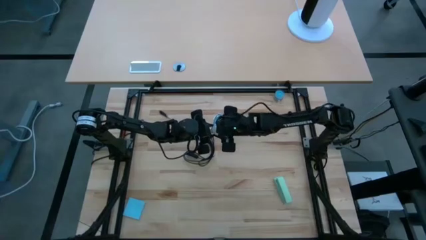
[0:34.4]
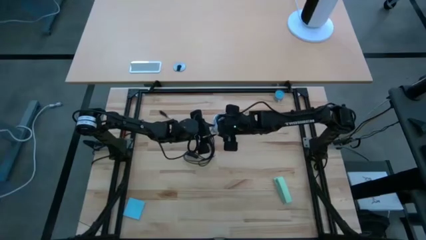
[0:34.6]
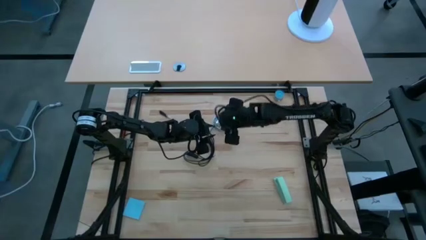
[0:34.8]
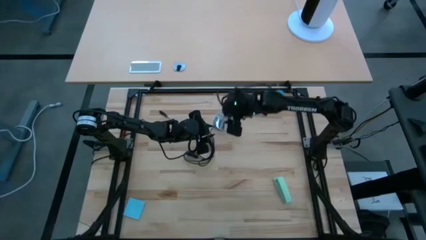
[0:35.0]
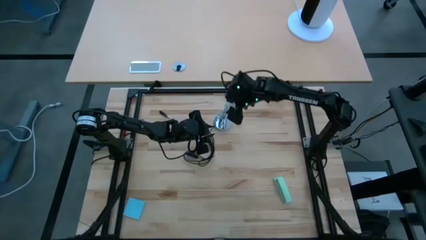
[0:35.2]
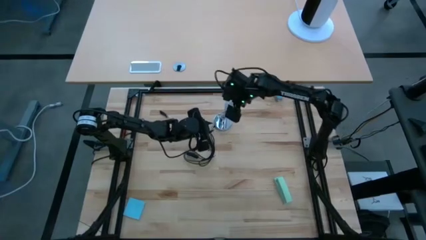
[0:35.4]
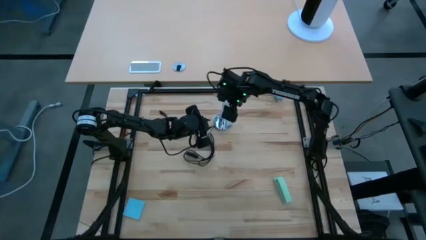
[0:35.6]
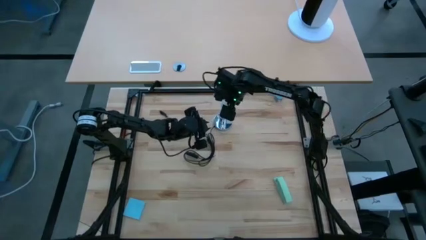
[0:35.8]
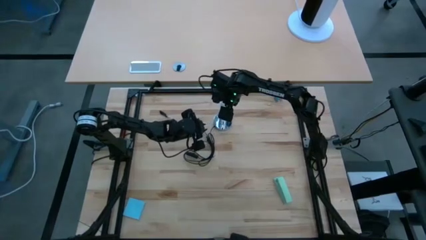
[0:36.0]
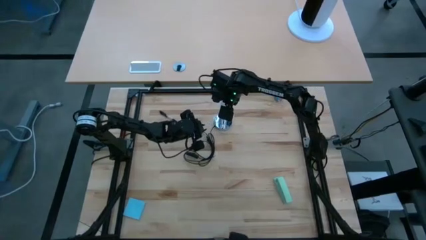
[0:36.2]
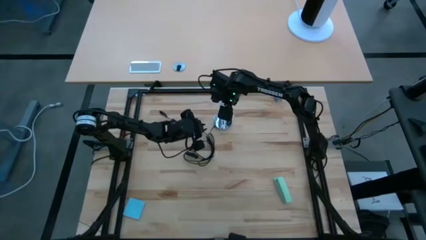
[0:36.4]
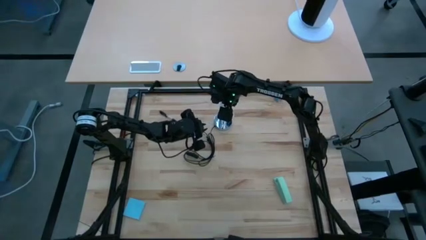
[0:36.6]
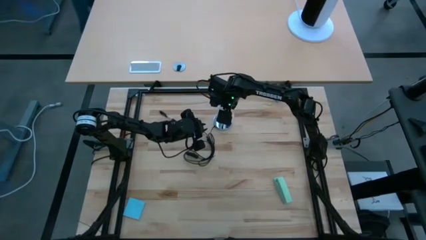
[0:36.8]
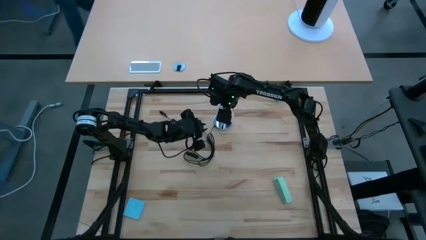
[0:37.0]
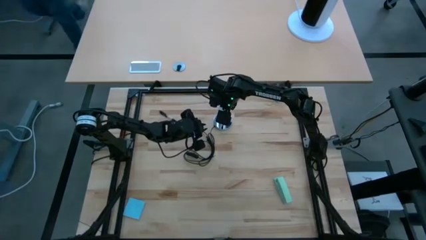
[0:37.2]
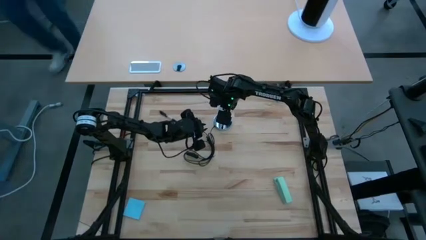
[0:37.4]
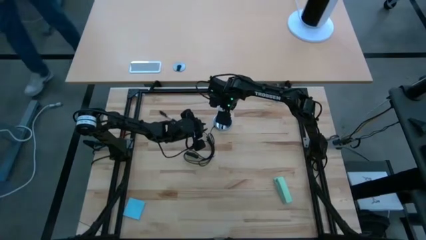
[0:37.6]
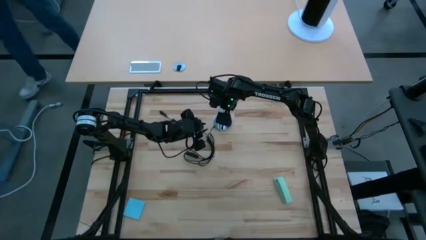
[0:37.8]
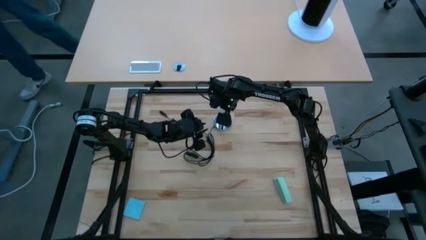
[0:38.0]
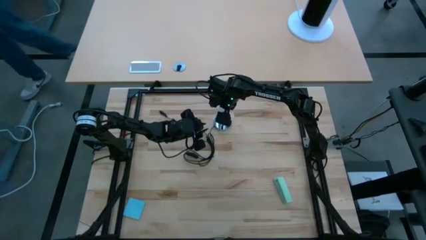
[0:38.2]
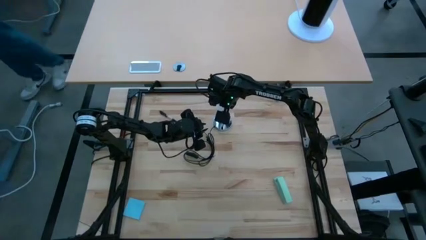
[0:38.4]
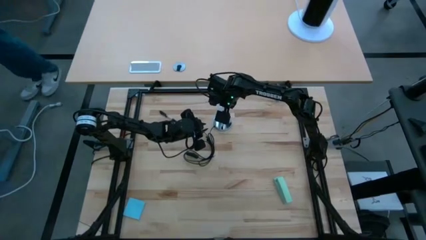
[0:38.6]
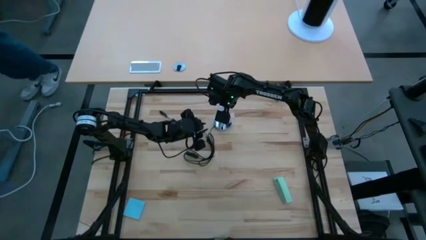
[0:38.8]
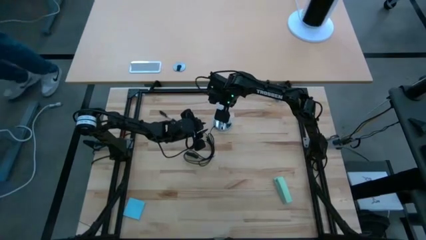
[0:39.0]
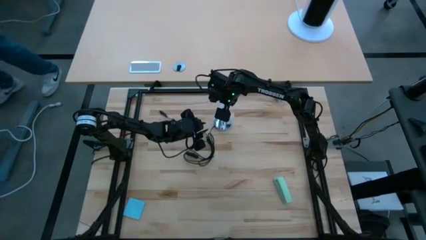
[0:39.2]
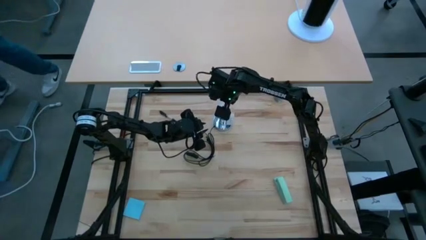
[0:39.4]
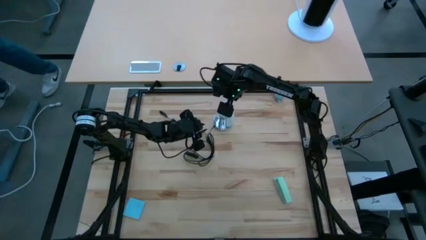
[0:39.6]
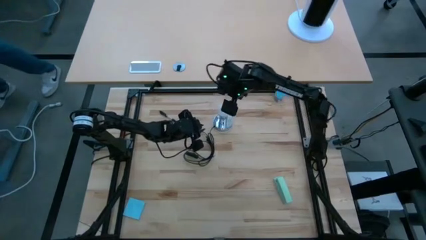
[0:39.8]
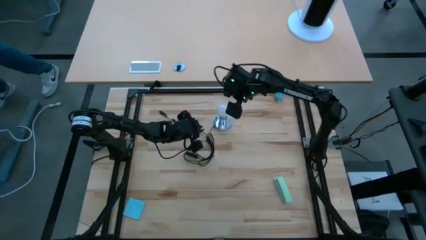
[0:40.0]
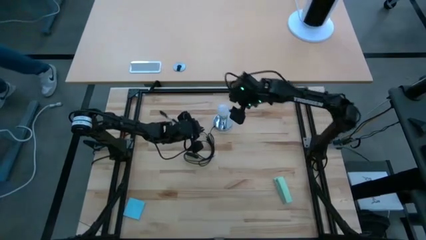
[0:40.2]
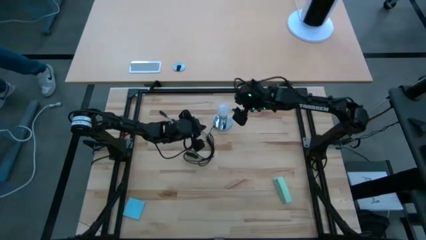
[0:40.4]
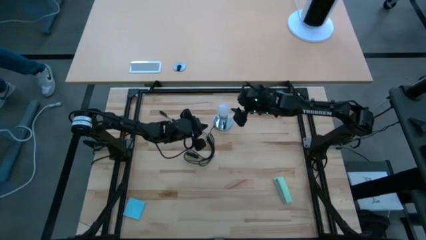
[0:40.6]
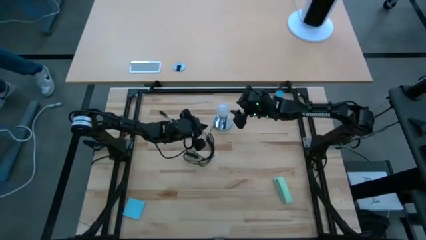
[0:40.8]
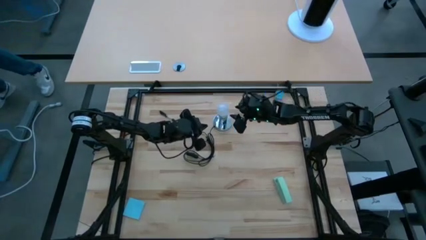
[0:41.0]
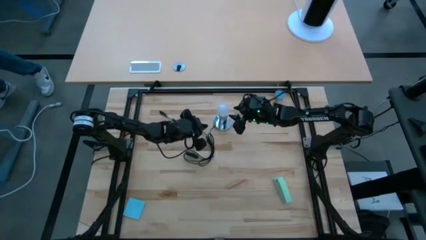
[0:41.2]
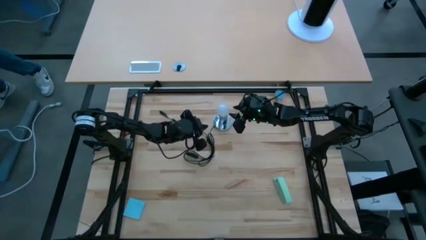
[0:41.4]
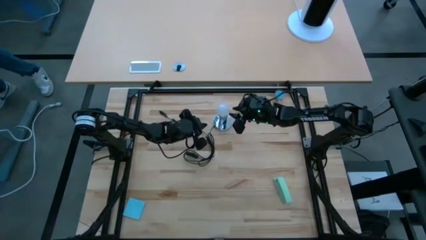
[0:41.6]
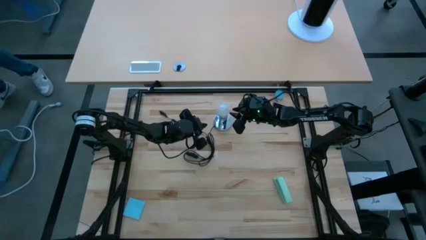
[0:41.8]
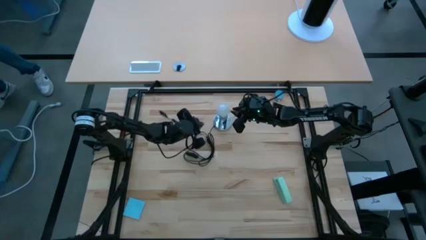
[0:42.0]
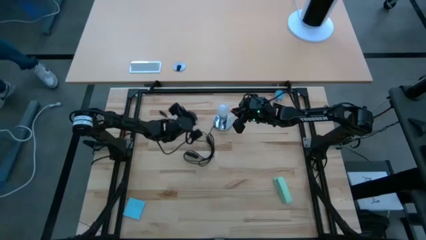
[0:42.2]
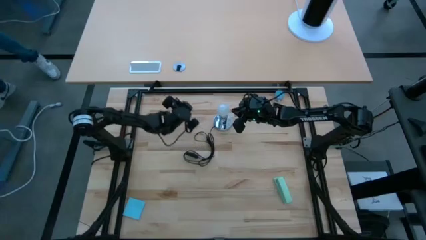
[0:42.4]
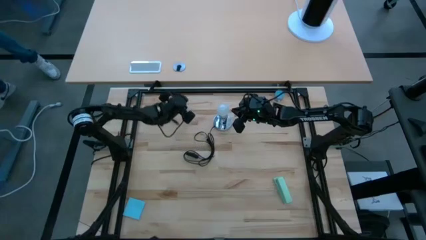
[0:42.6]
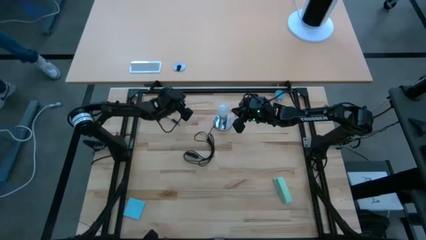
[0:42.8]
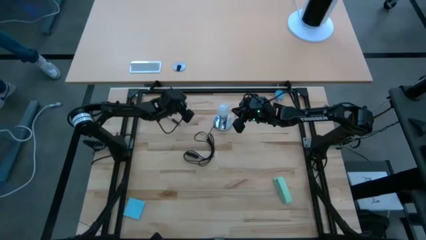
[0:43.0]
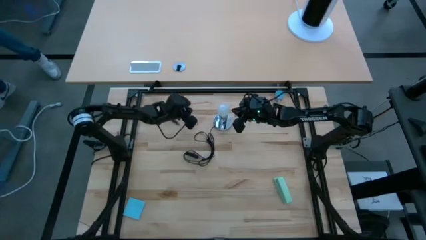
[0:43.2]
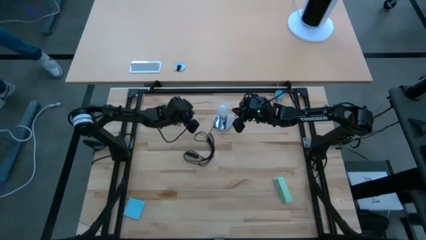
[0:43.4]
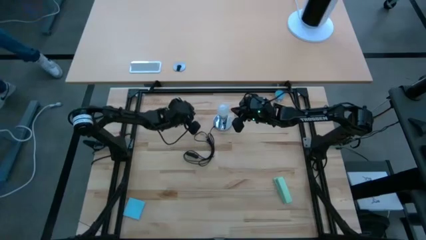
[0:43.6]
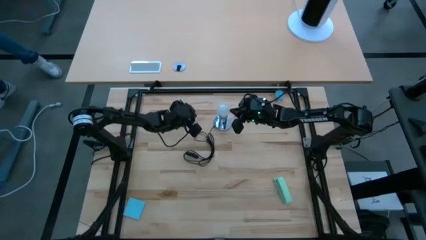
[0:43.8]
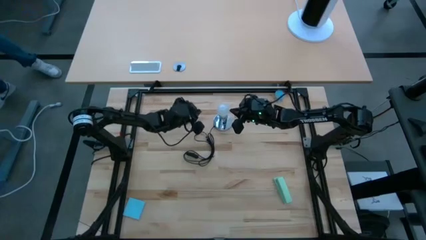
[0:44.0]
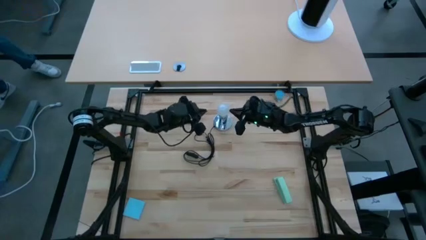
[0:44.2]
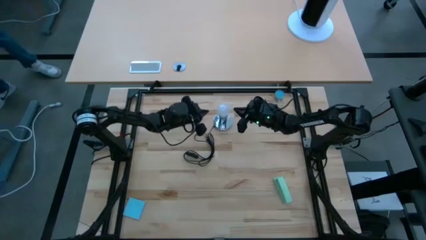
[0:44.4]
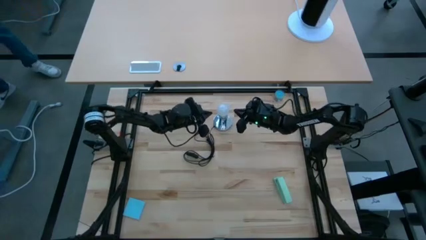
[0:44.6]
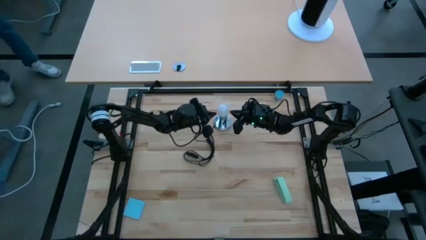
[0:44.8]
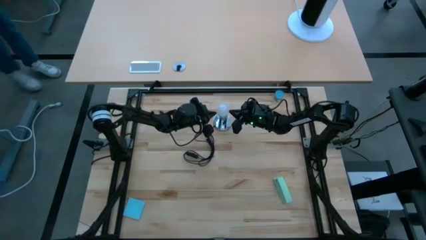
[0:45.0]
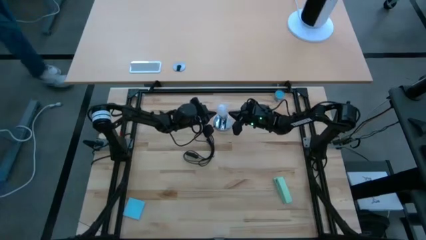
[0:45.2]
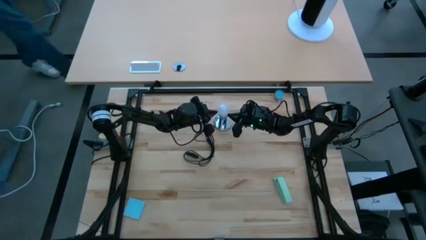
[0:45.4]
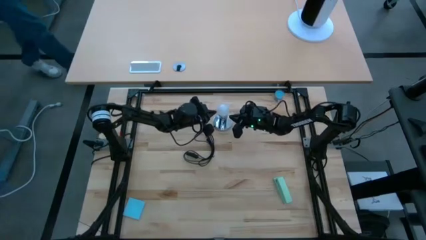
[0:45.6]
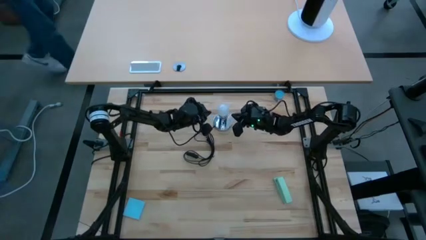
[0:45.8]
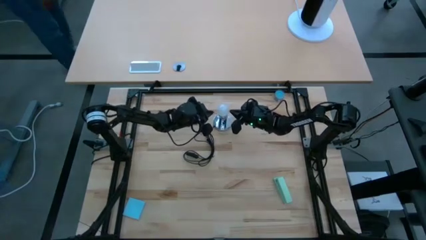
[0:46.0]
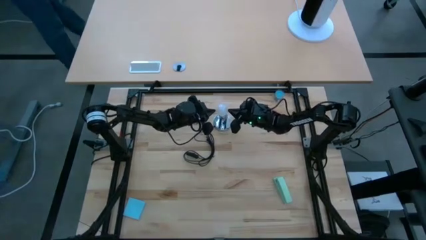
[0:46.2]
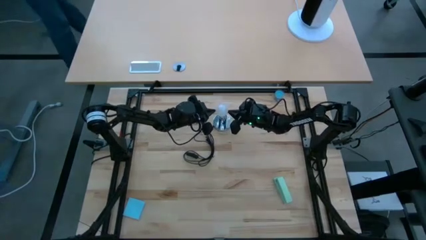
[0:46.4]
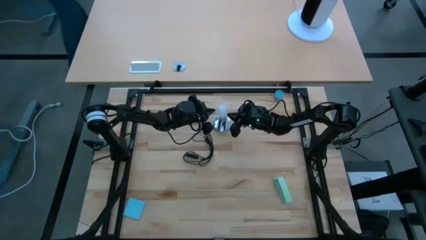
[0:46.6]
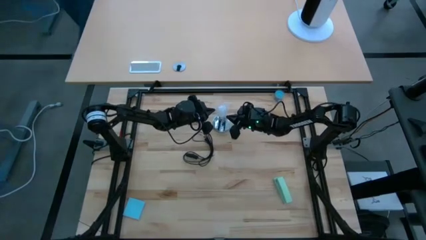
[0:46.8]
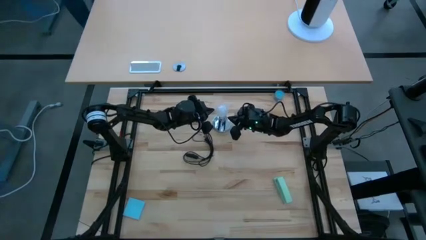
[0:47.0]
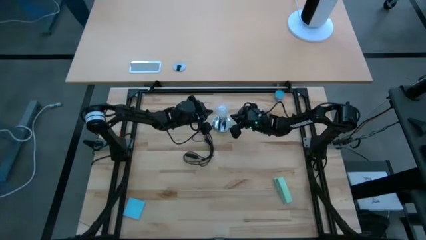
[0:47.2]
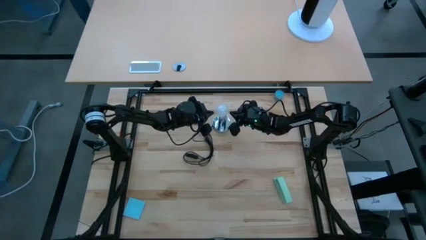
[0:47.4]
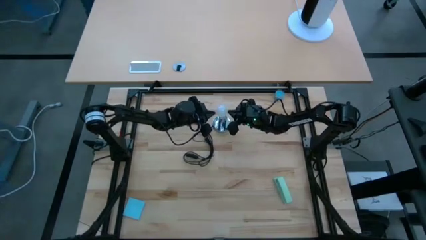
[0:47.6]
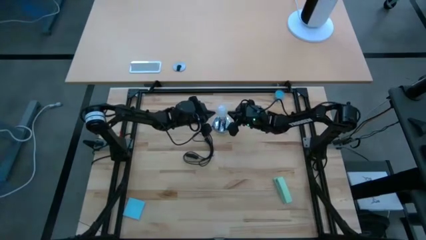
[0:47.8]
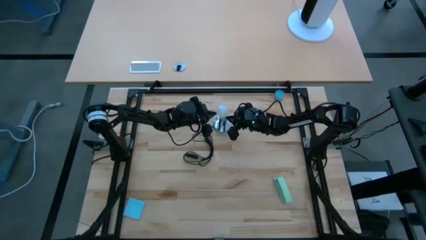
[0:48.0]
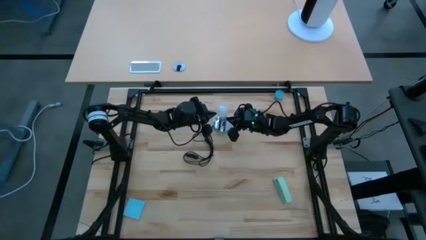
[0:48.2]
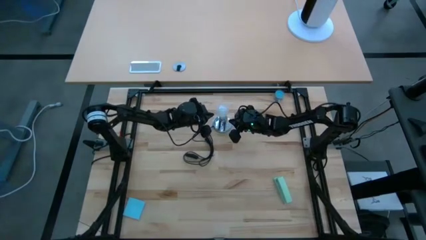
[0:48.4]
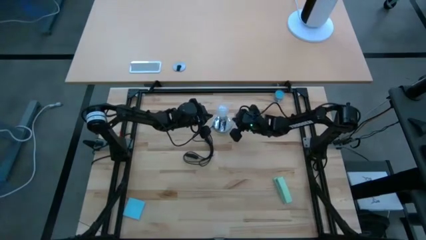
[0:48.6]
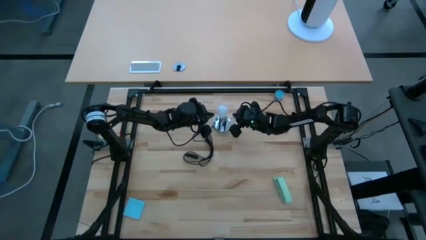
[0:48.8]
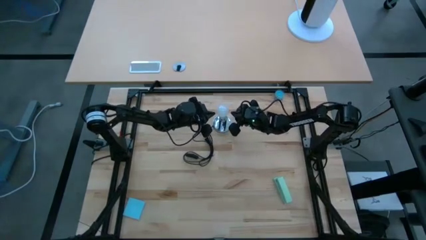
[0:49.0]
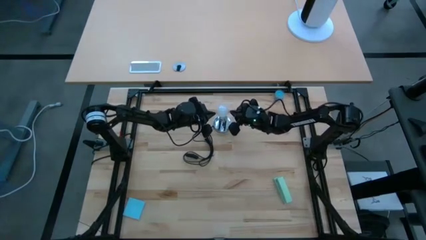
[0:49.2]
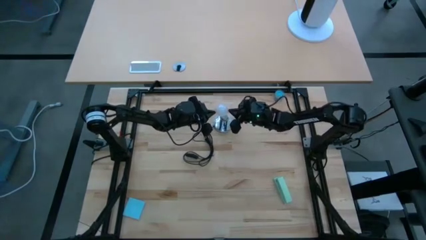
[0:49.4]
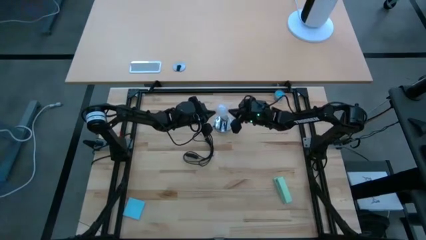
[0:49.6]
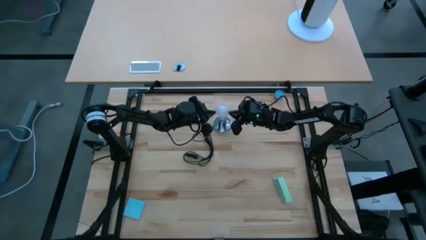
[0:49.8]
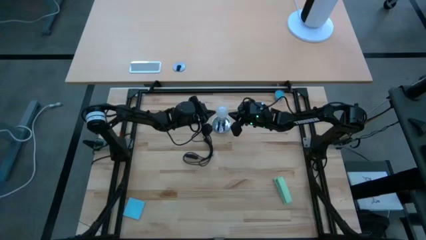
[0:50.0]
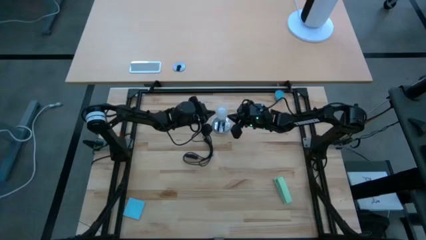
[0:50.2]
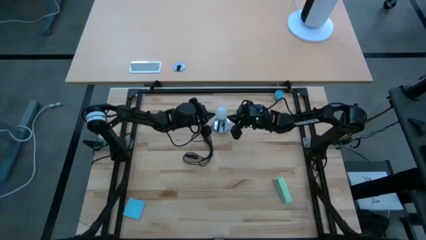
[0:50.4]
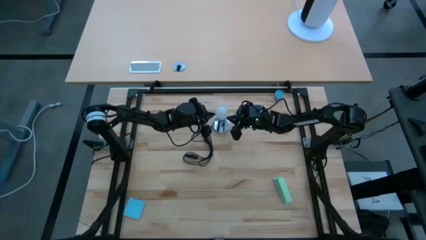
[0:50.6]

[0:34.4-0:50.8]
Task: Screw lightbulb
Insert the lightbulb into the lamp
